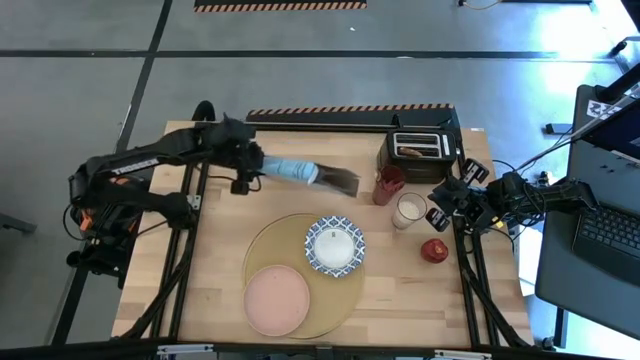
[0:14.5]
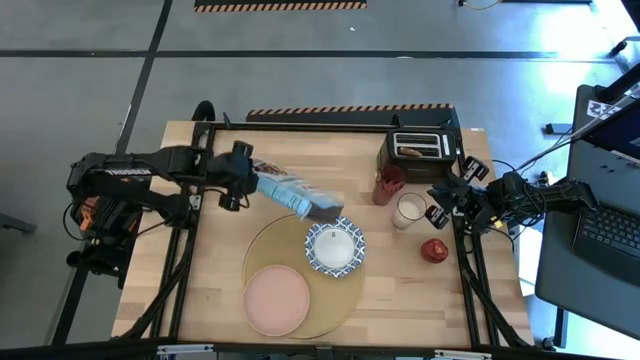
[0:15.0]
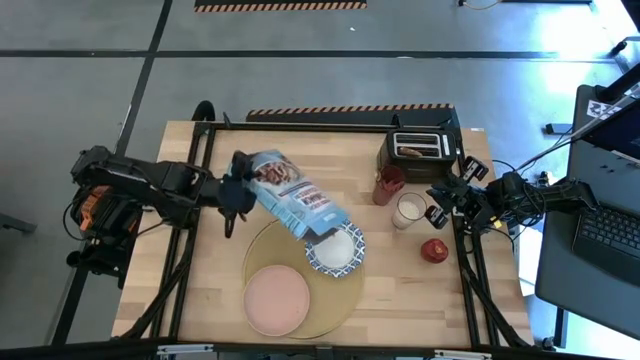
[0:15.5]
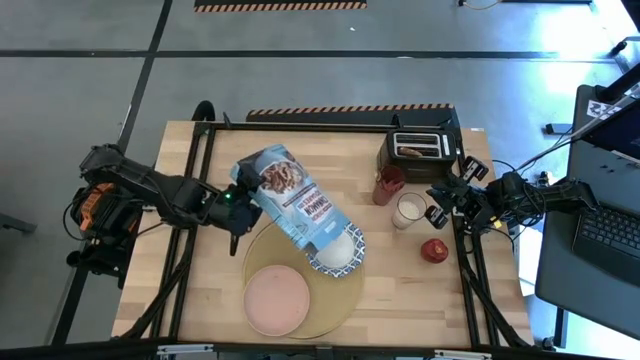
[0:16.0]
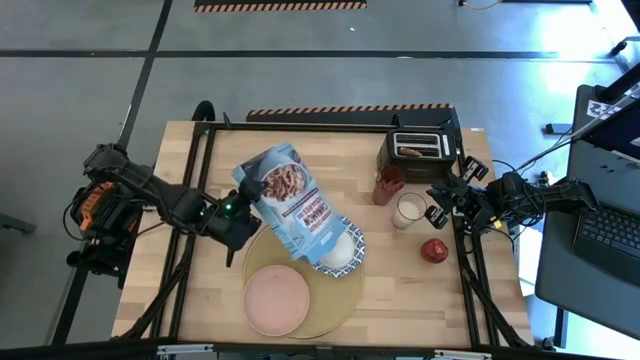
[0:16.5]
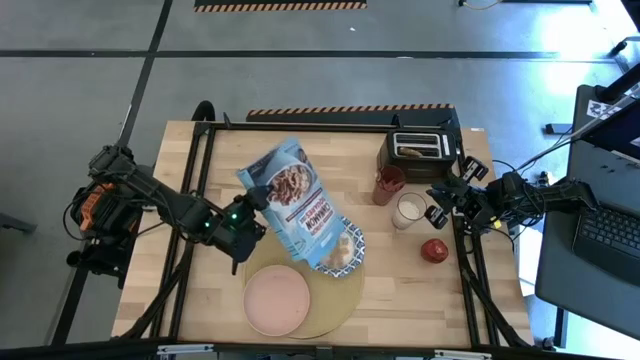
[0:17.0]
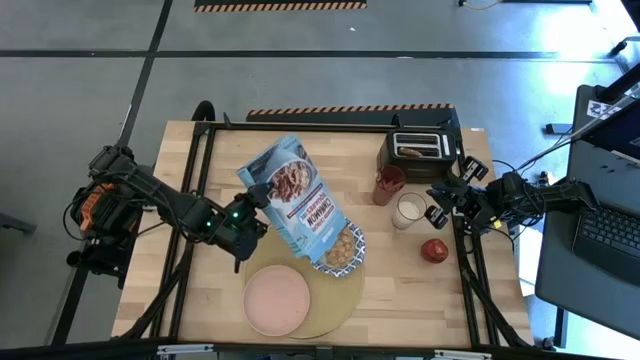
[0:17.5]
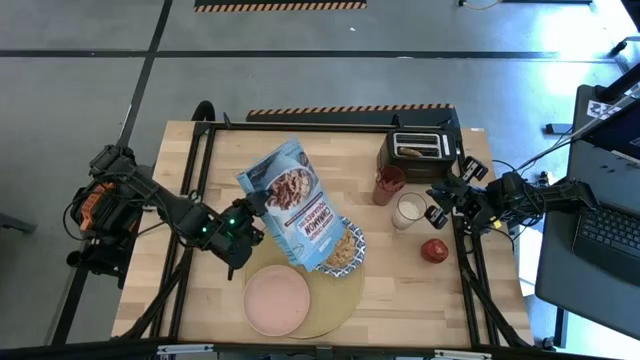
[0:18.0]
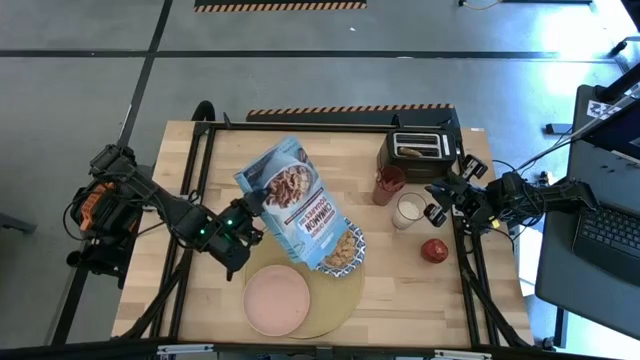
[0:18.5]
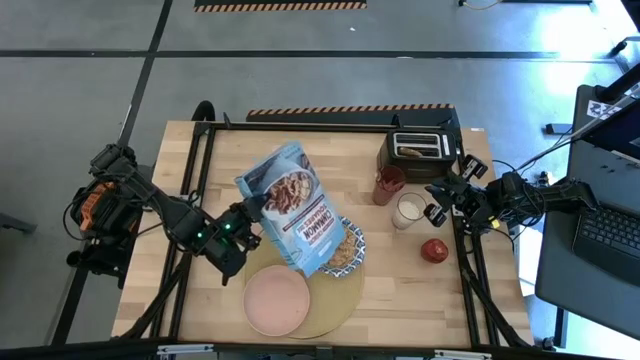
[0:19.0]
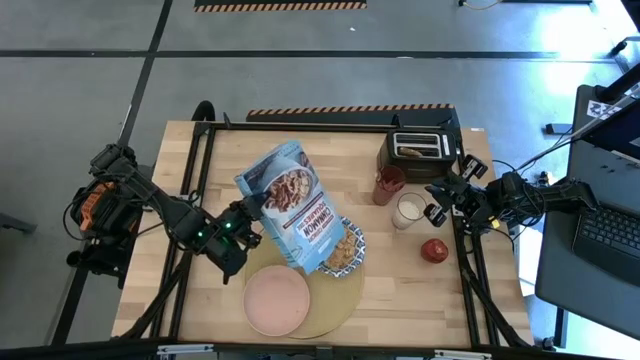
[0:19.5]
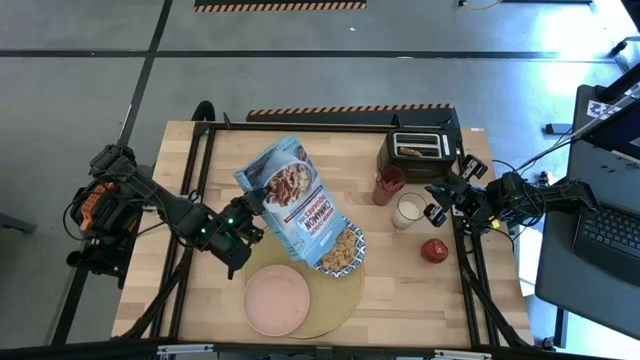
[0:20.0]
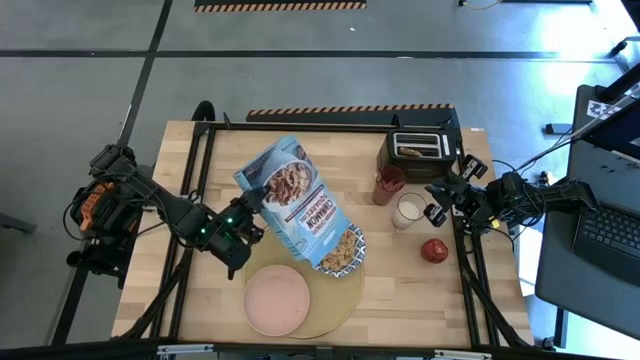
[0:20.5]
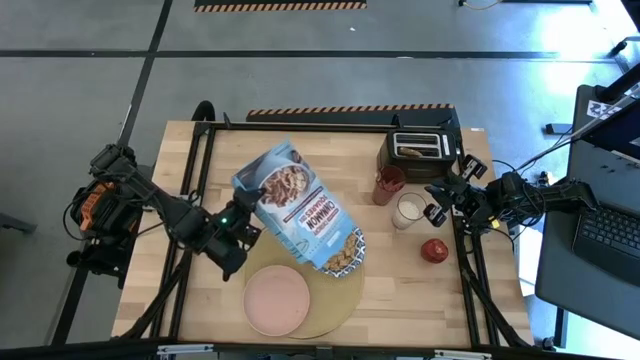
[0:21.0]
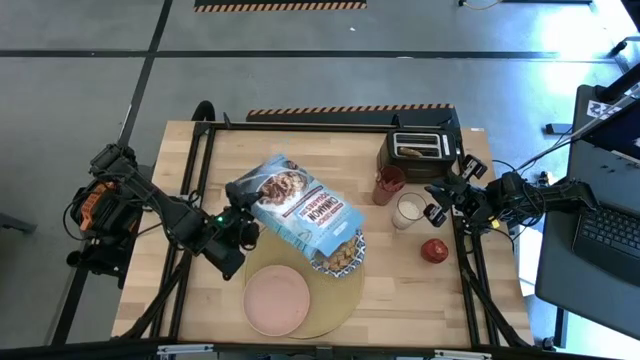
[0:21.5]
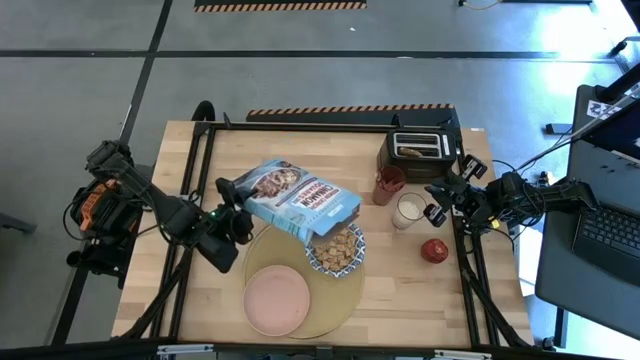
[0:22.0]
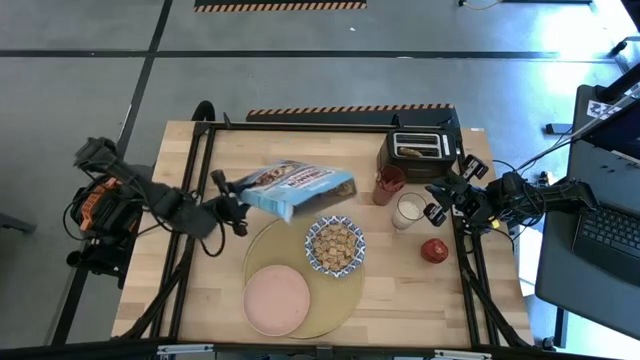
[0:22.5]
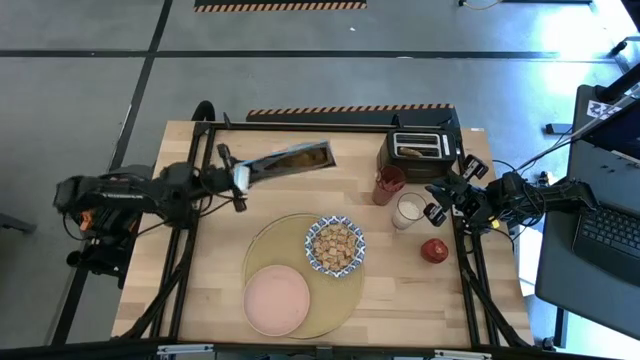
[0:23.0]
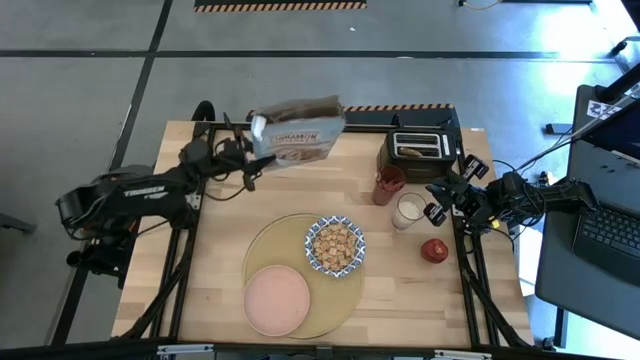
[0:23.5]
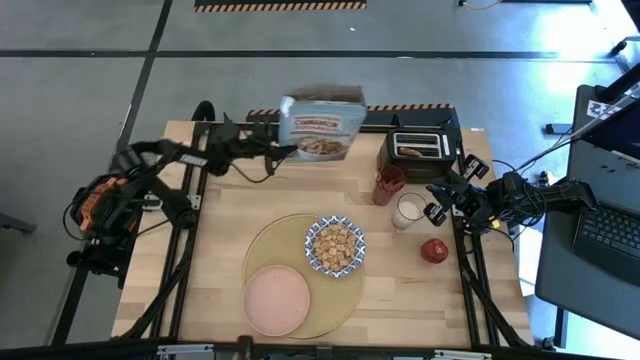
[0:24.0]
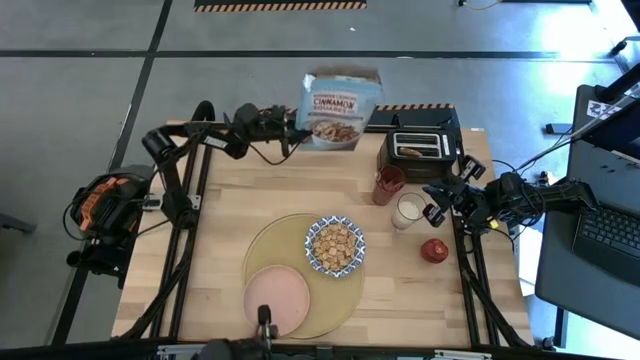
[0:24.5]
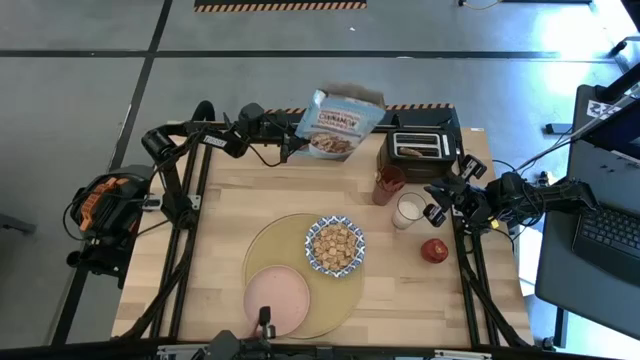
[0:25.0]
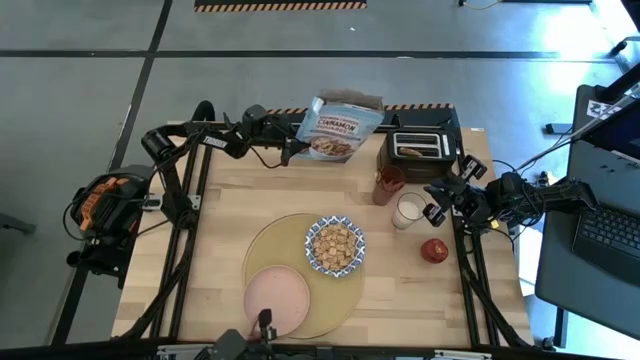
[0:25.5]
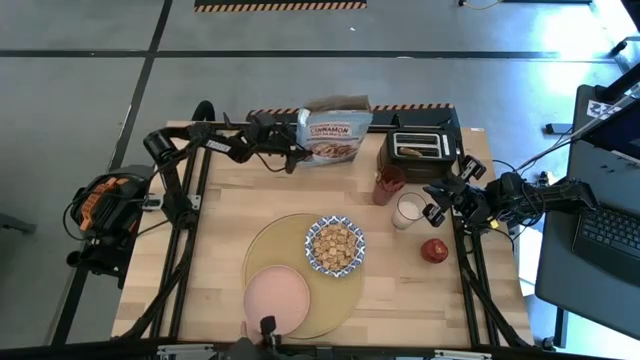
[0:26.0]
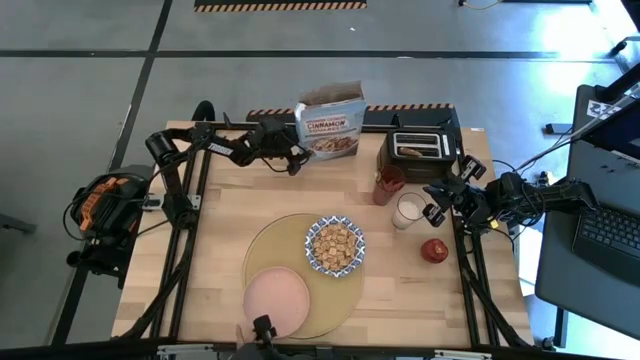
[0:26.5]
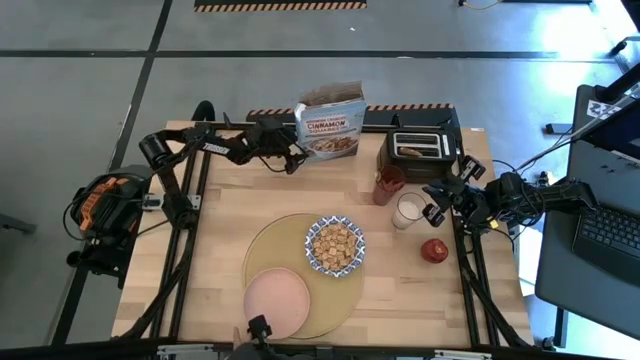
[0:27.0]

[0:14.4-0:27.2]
Task: Arrange a breakfast setting
Pour the cereal from the cereal box into the white pattern bowl

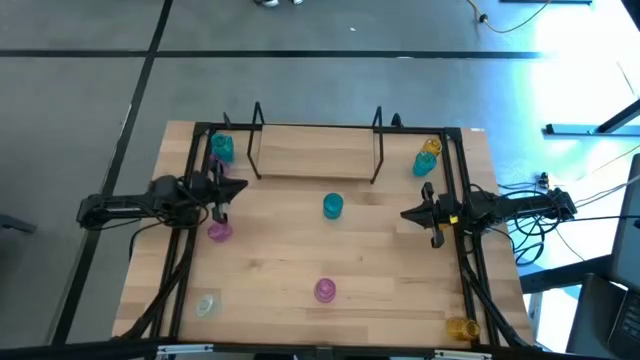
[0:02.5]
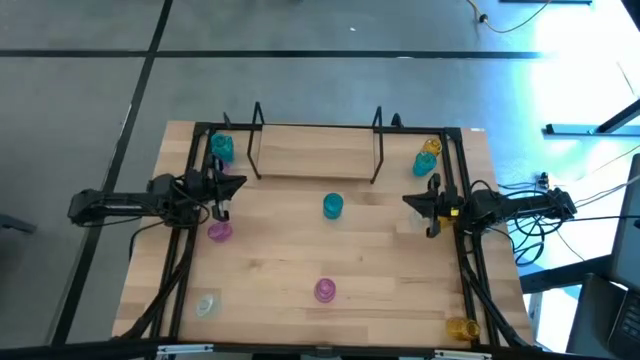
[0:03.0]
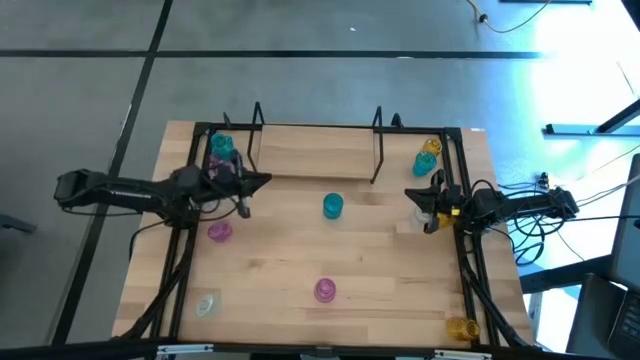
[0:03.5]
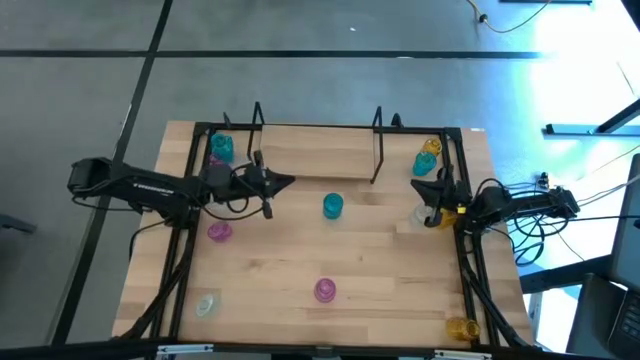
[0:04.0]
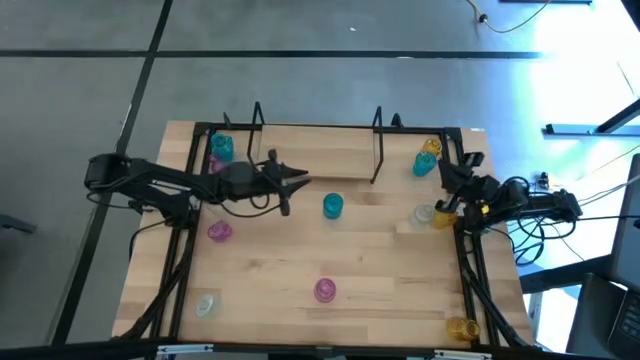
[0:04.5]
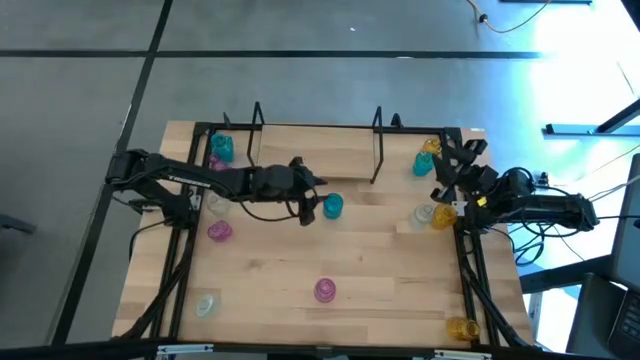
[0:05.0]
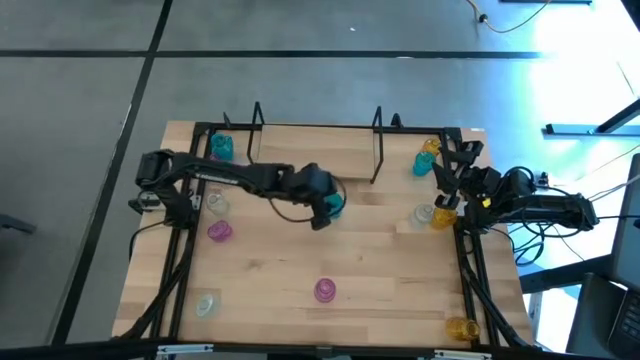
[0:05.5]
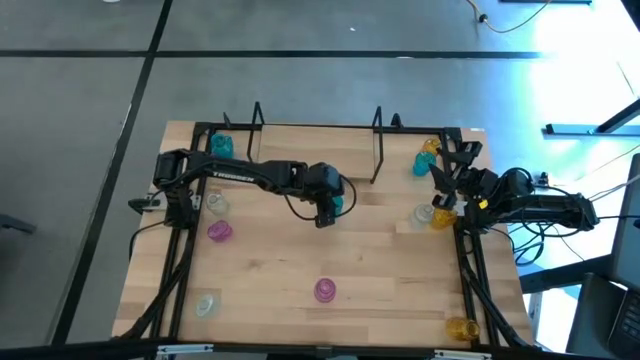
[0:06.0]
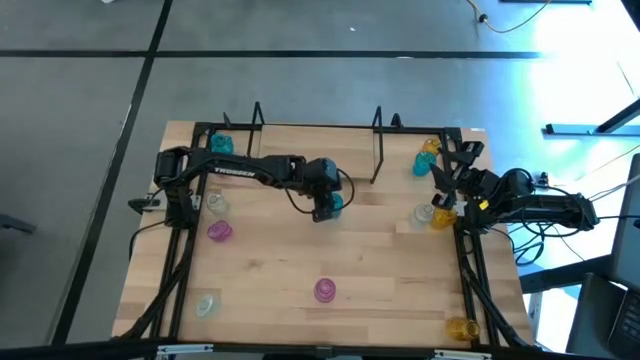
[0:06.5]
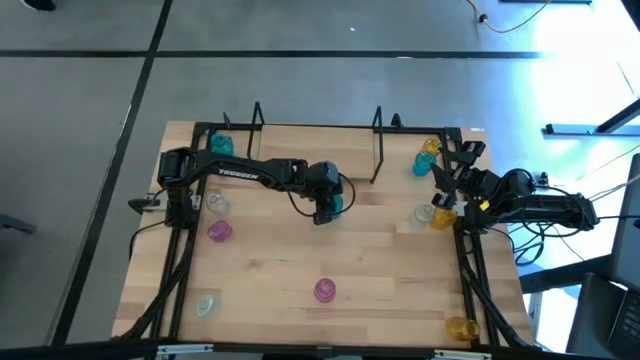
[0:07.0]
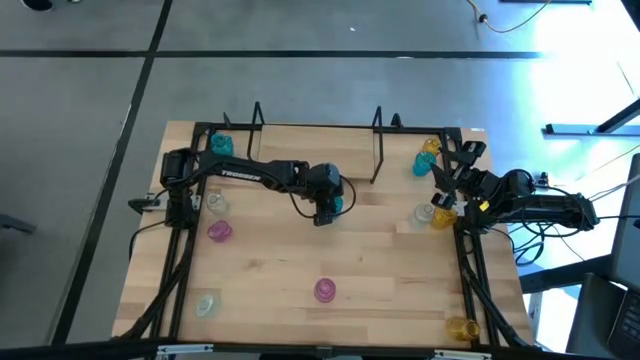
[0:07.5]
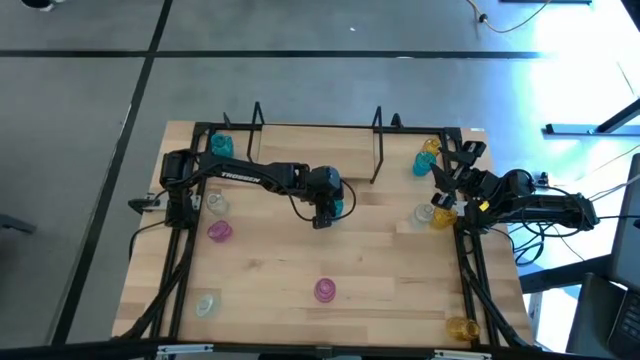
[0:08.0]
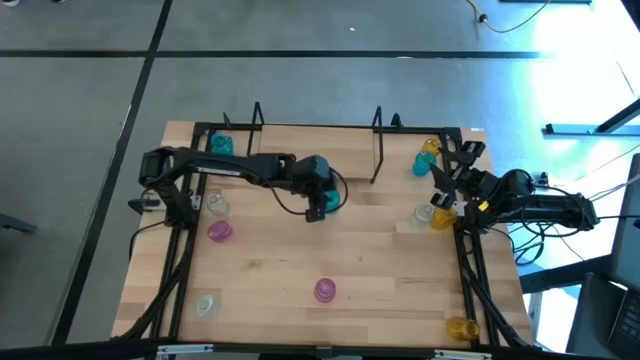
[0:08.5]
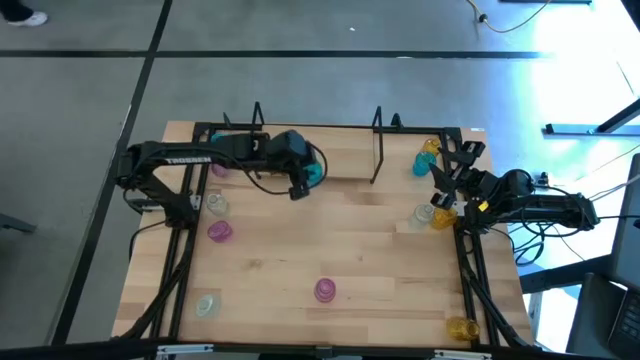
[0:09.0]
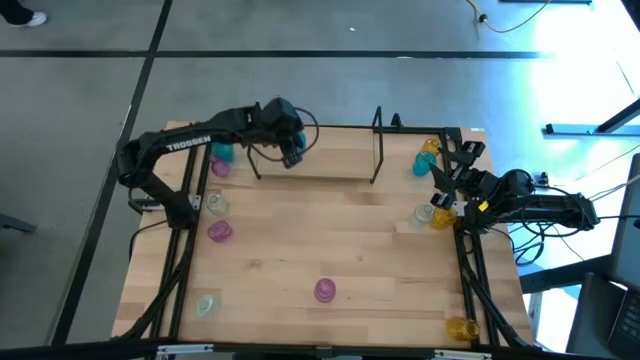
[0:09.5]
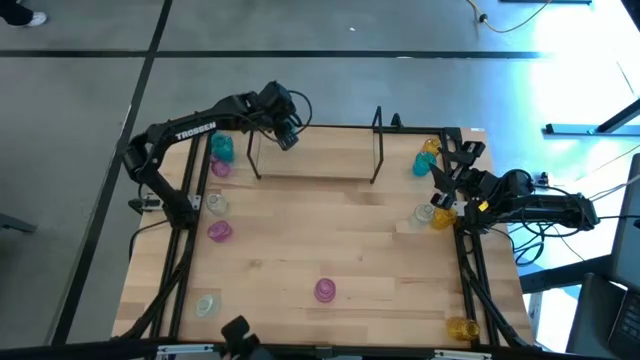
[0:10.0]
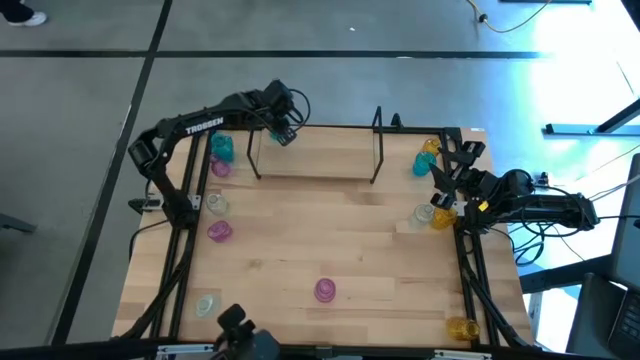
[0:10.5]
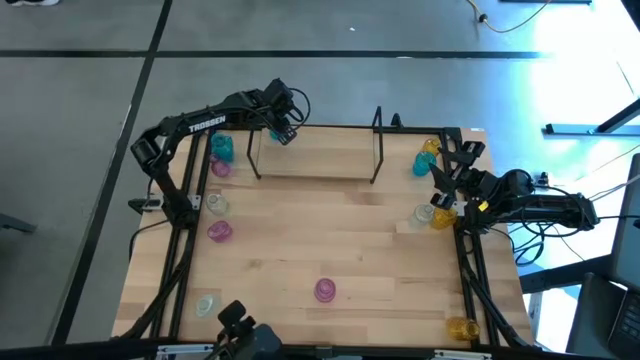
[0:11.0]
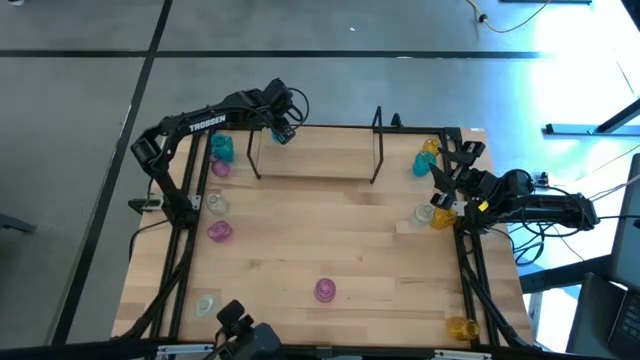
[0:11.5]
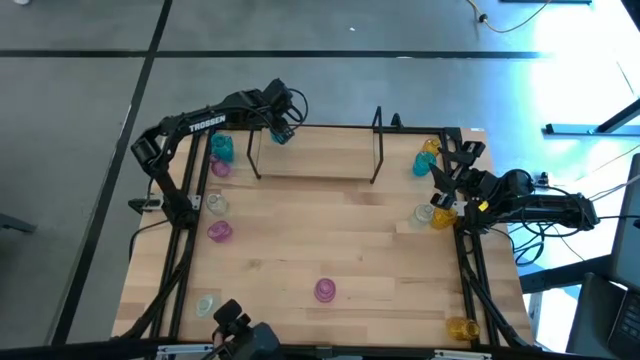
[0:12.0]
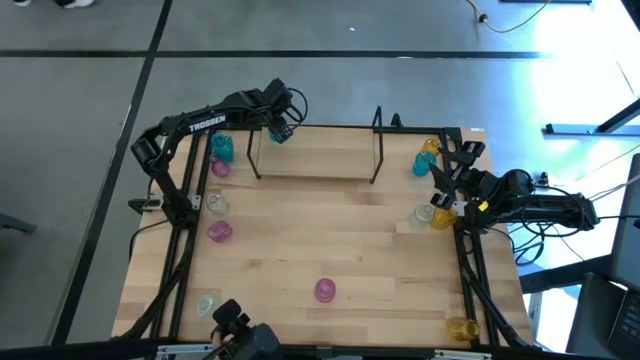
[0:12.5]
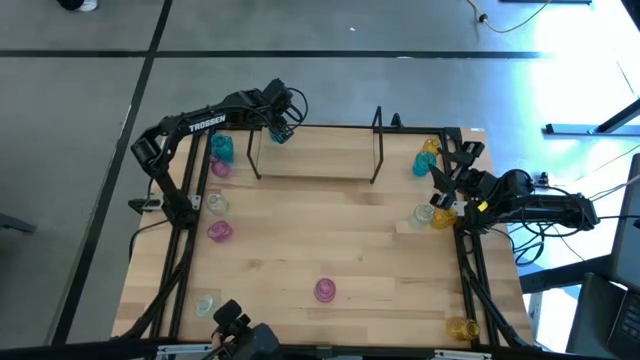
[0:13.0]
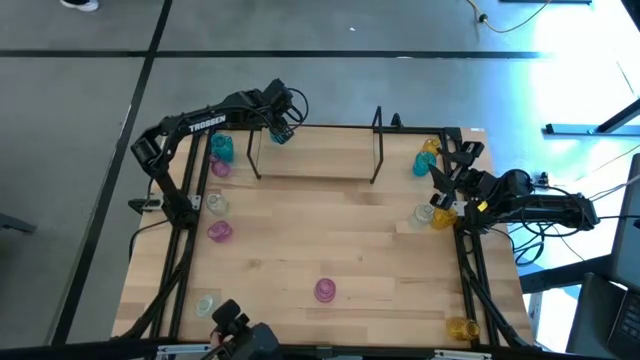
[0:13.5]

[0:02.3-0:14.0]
Task: sort vases onto shelf
Put the middle blue vase on the shelf
